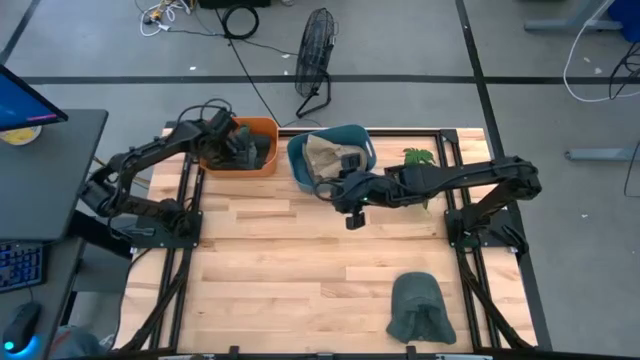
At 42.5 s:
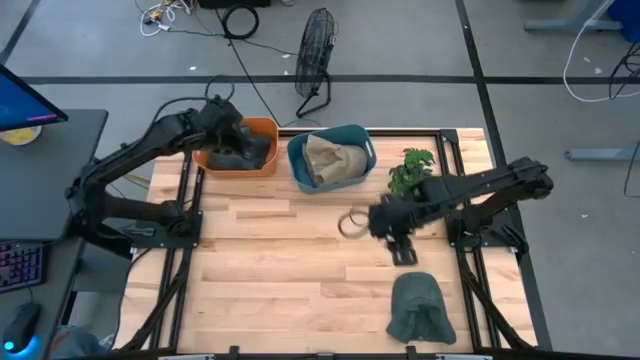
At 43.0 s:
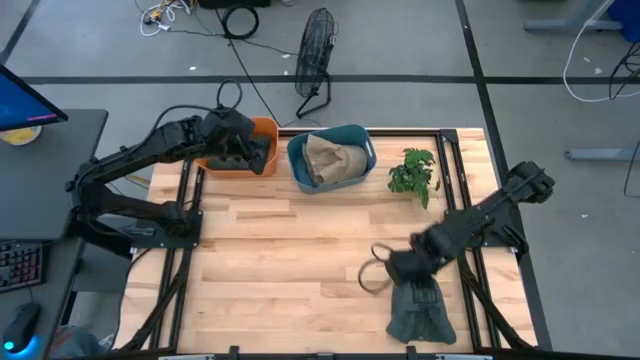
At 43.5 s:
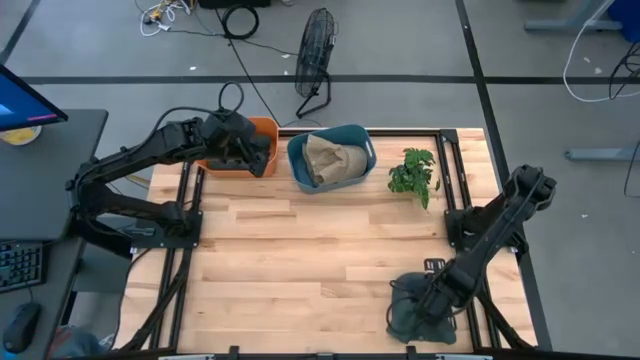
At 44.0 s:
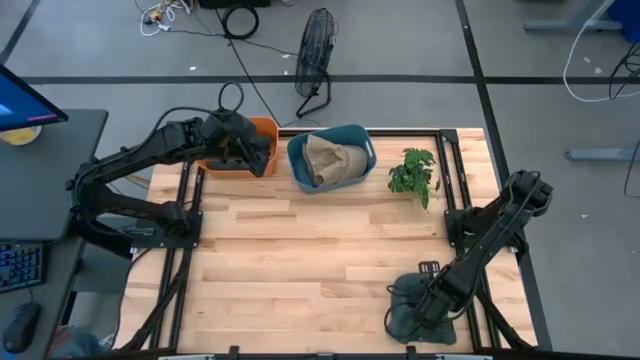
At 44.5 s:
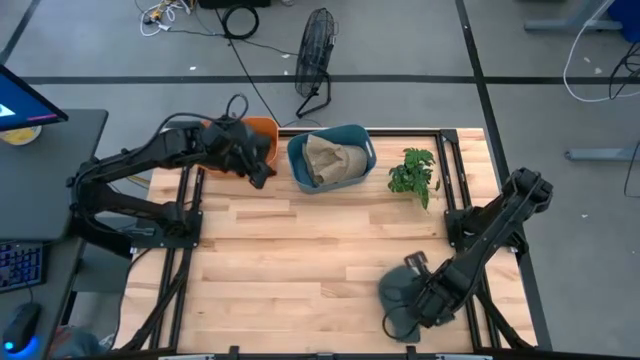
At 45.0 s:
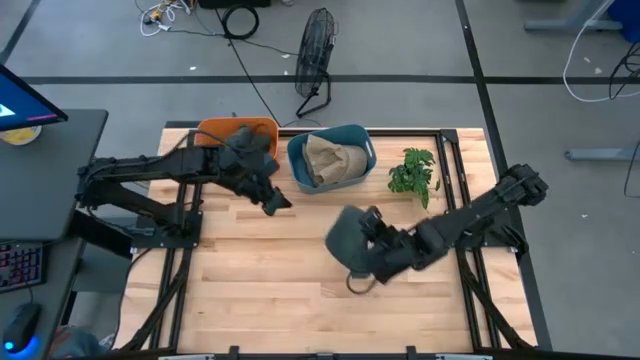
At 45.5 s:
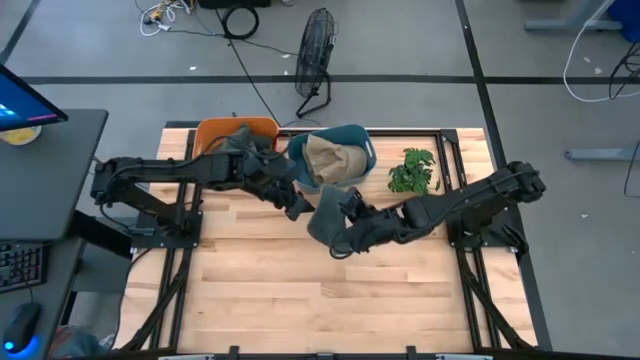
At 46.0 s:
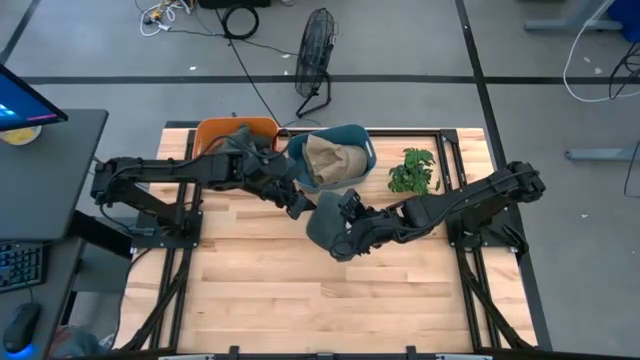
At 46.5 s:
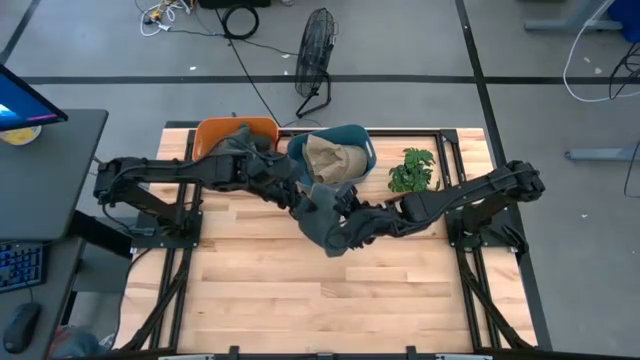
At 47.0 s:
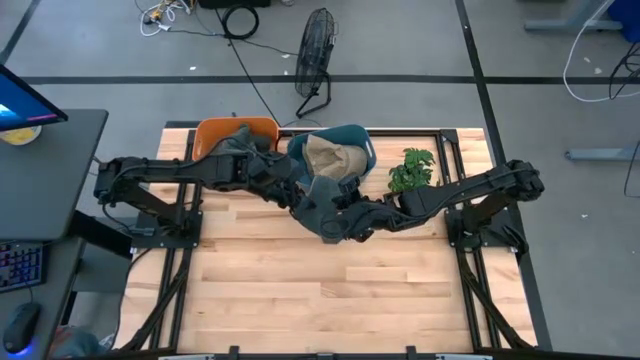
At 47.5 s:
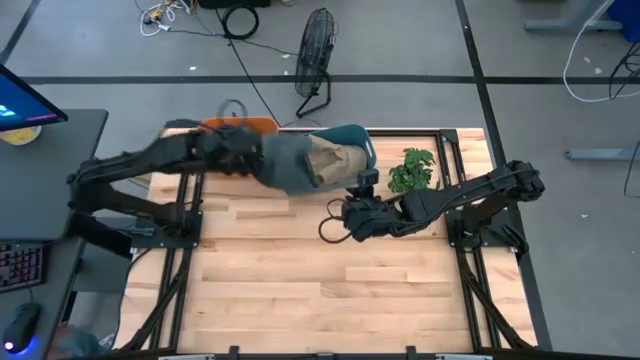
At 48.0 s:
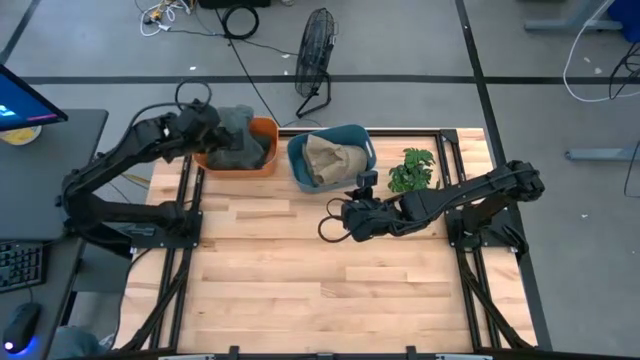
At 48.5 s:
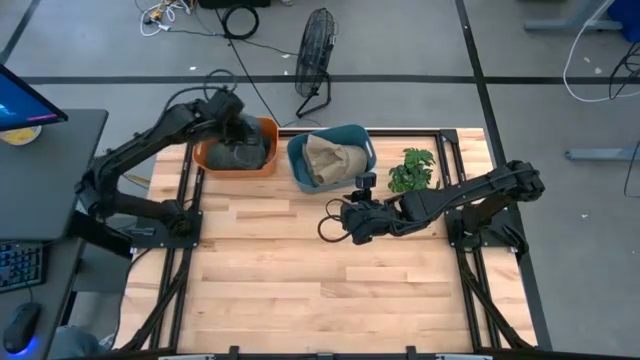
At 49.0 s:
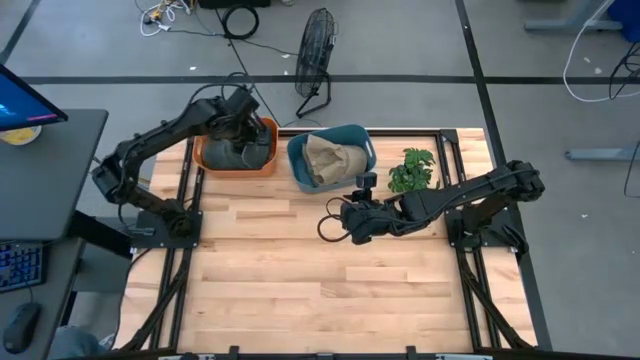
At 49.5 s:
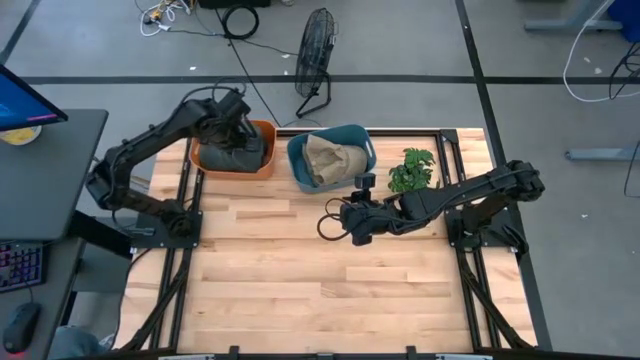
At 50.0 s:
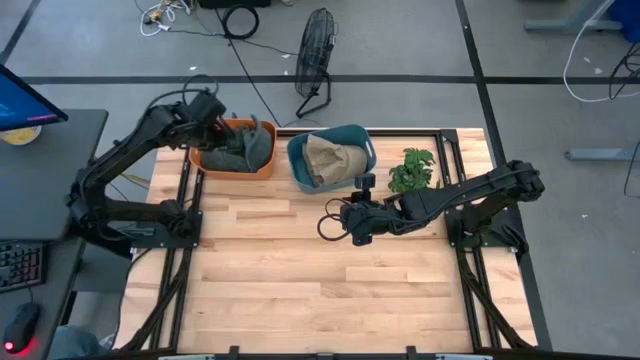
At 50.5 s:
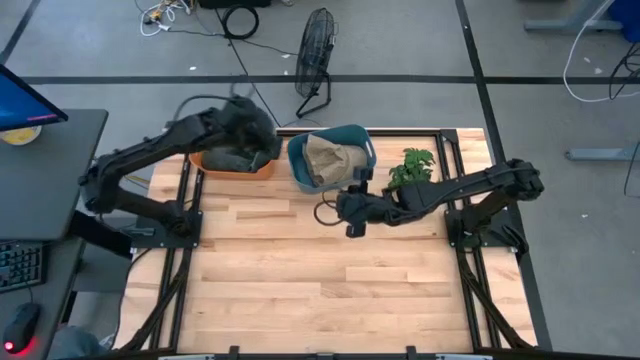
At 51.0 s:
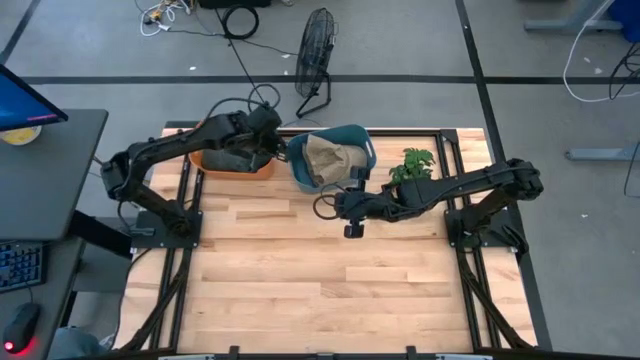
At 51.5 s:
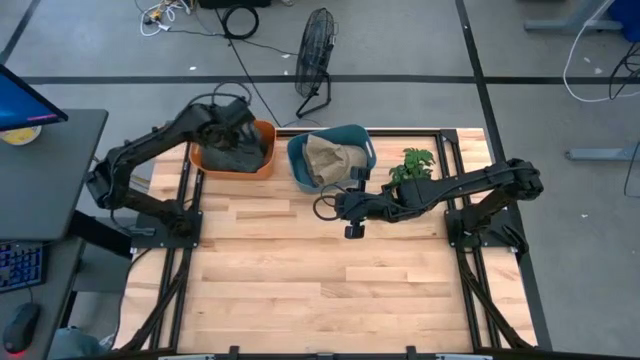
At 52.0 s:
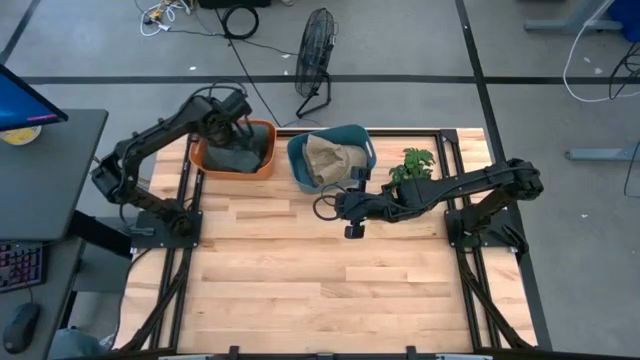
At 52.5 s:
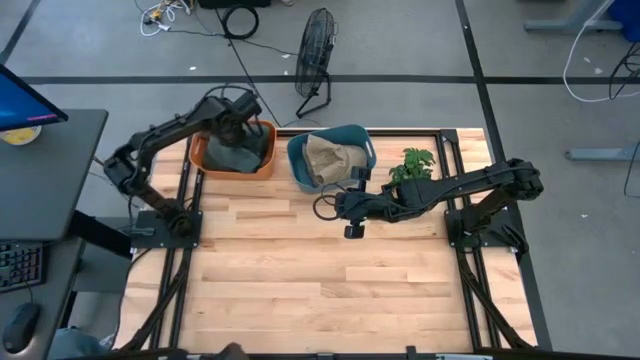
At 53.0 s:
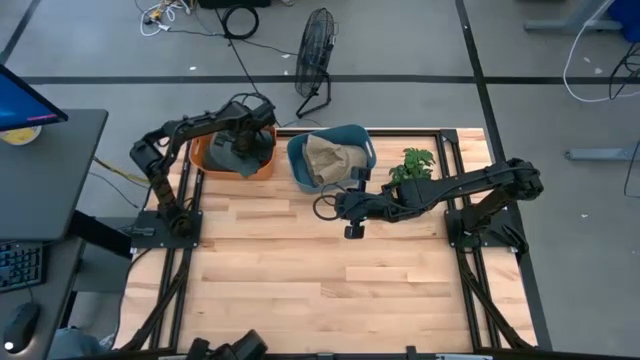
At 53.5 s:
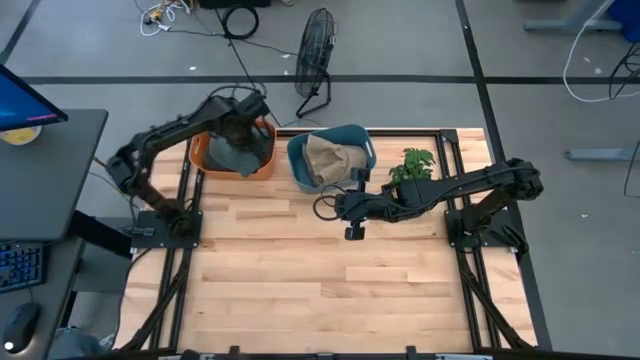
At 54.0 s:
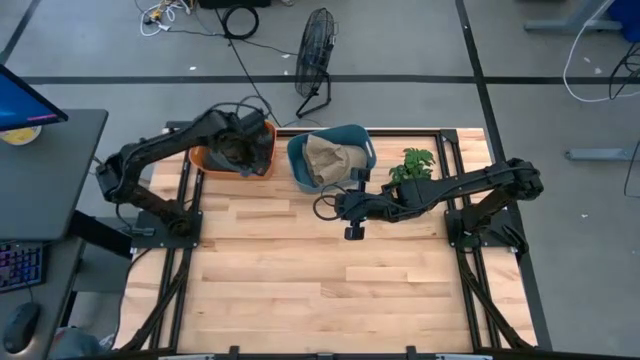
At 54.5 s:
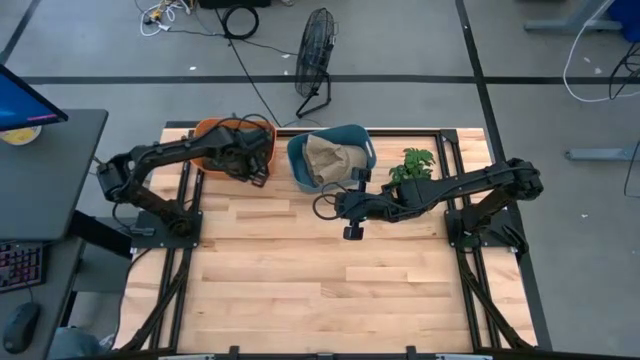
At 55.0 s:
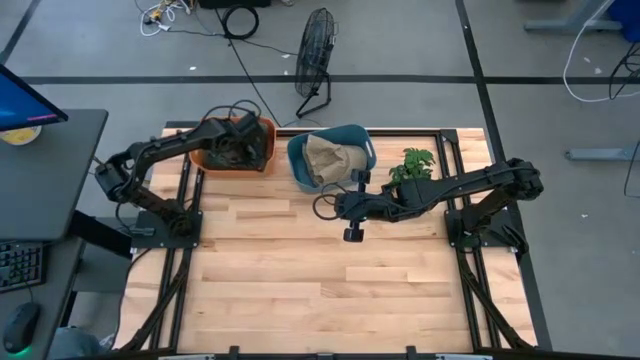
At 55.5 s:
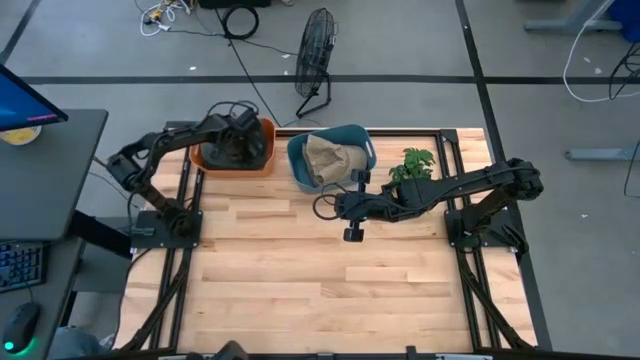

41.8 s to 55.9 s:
Task: Pick & Place hat
Put the gray cap into the orange bin

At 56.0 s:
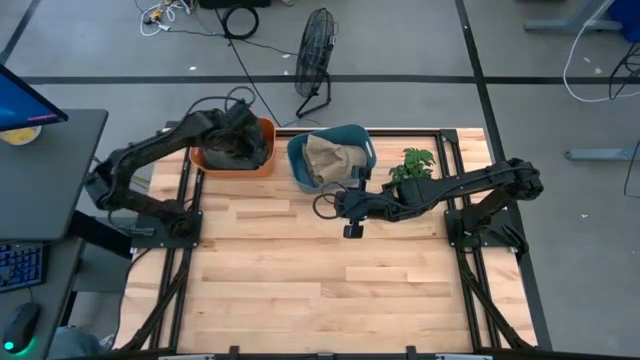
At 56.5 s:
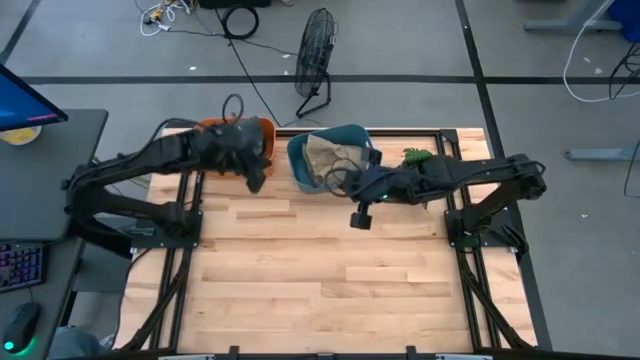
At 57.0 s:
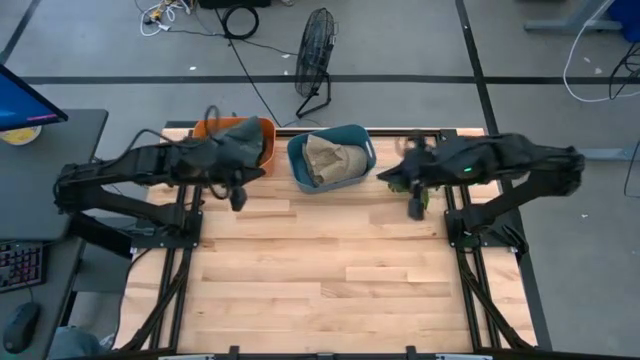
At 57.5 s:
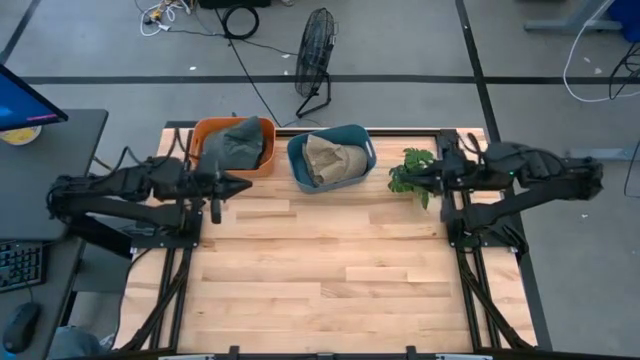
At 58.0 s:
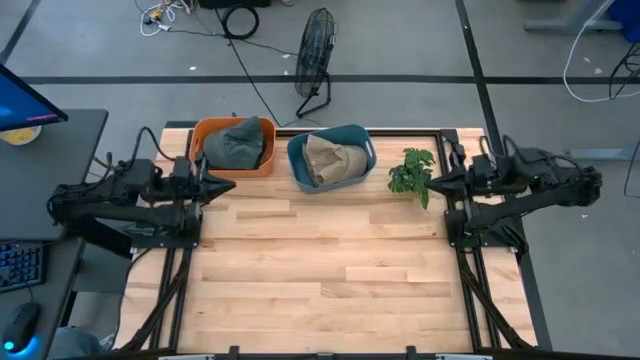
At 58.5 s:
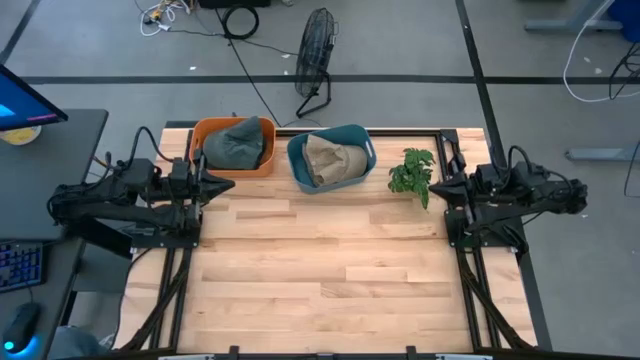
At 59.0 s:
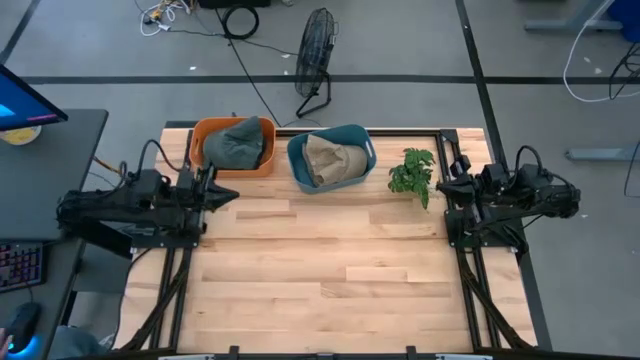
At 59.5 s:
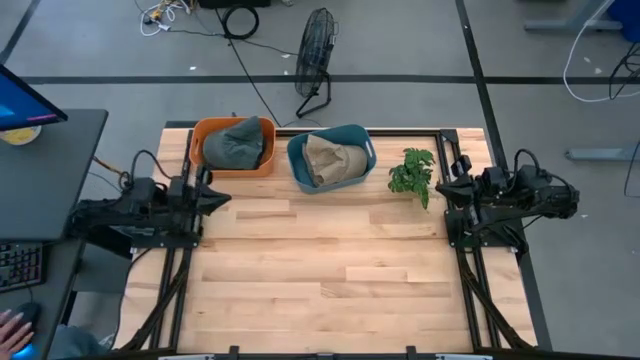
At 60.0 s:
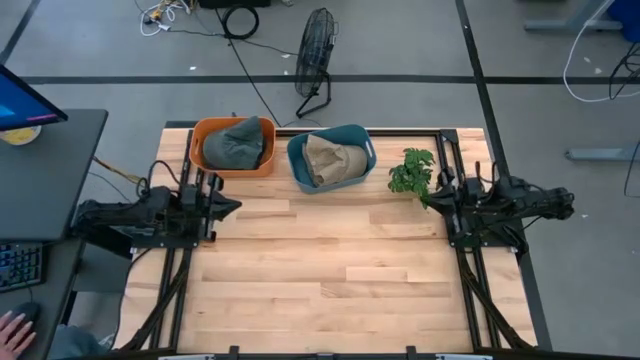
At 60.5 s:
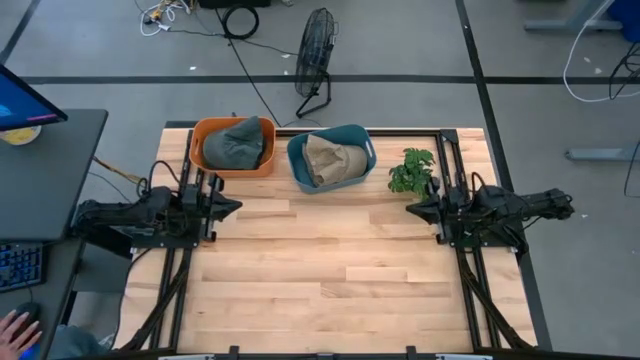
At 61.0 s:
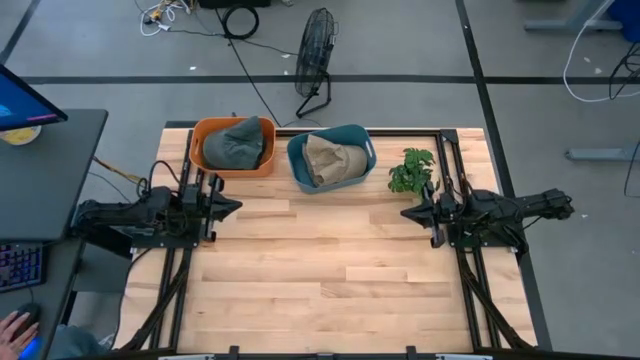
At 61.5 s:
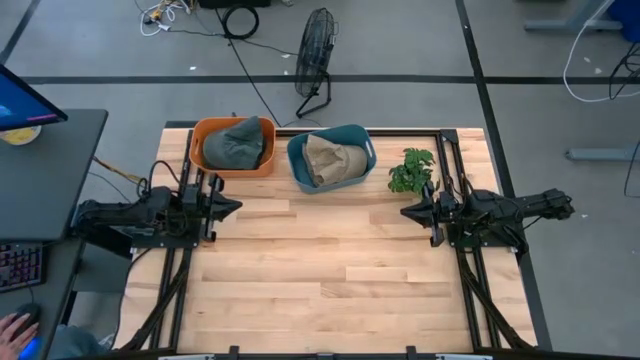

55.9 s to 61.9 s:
Return to Home Position

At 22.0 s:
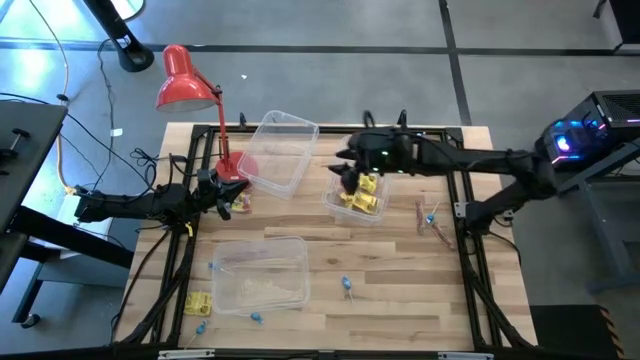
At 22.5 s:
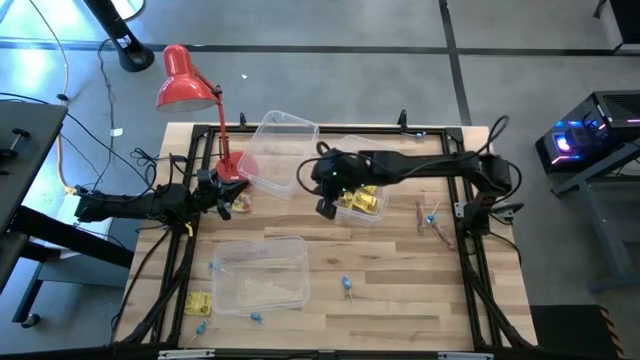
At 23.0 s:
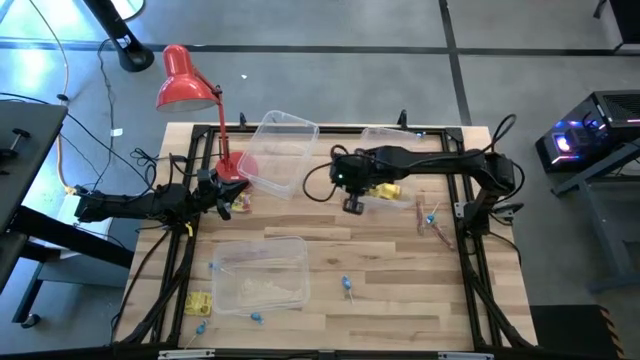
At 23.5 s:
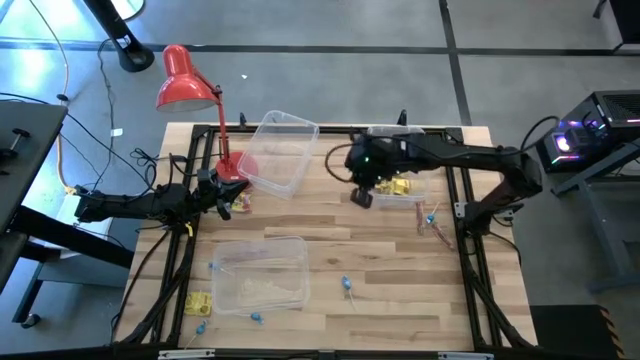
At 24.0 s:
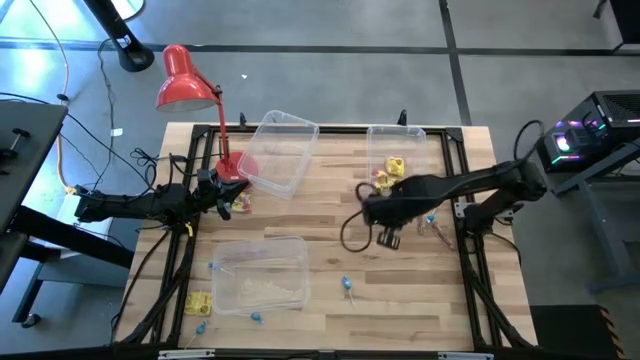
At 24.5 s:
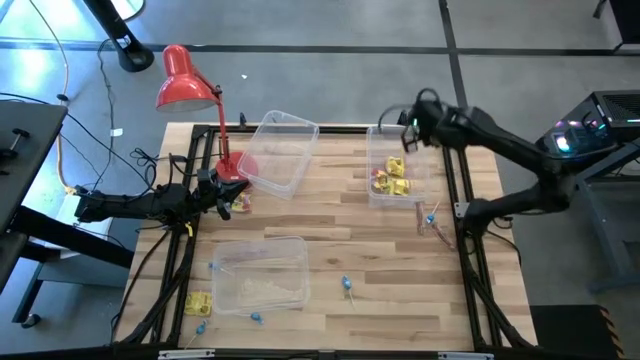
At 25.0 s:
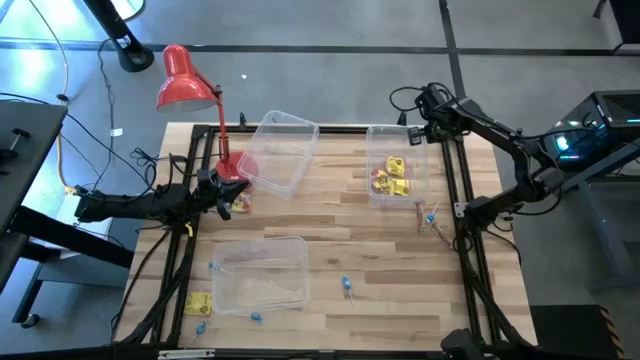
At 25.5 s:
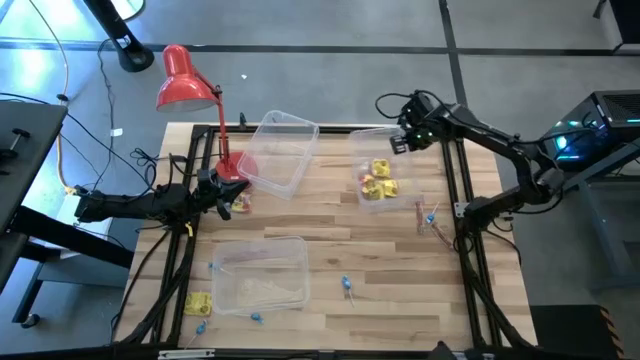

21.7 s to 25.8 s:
Task: Sort candy
Adjust the top right transparent bin
